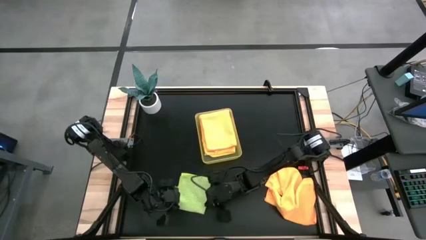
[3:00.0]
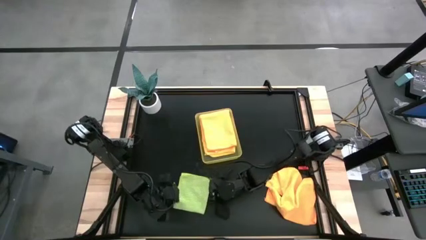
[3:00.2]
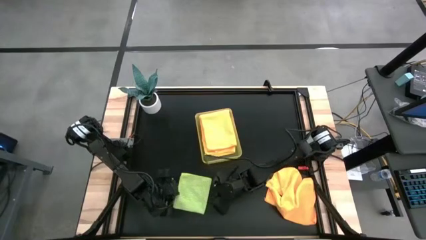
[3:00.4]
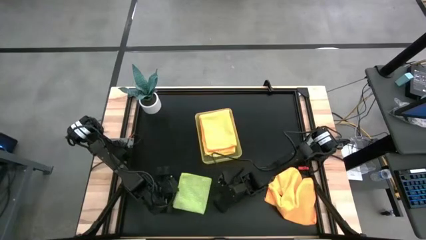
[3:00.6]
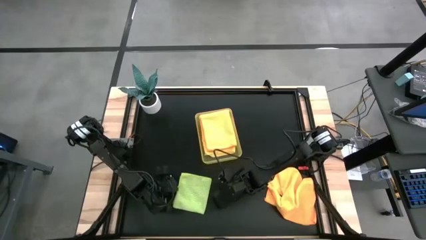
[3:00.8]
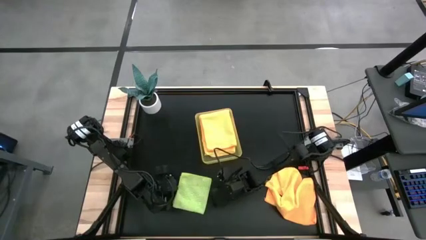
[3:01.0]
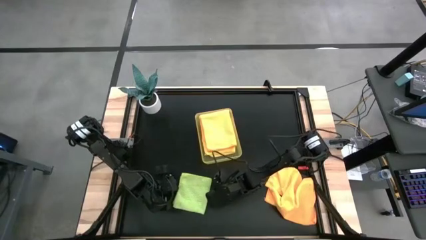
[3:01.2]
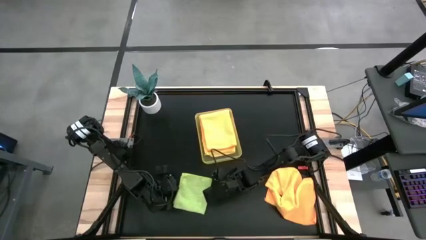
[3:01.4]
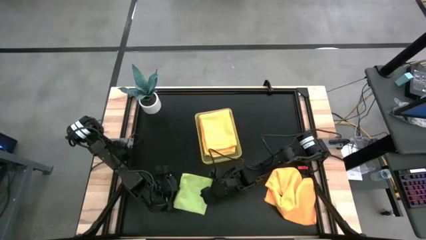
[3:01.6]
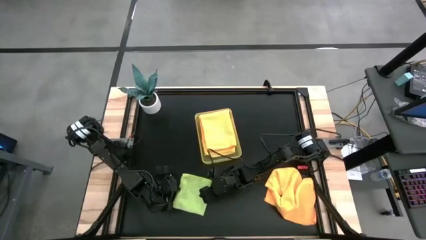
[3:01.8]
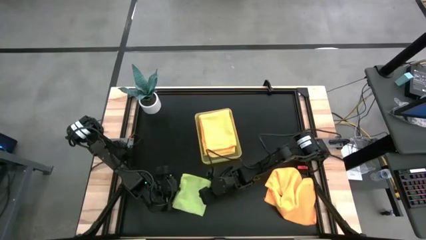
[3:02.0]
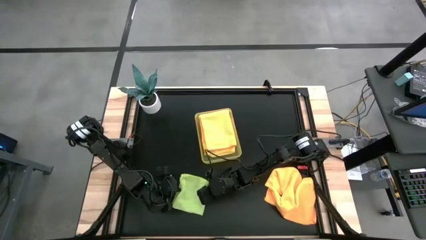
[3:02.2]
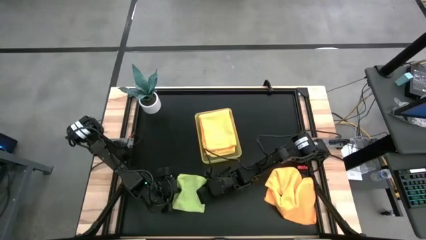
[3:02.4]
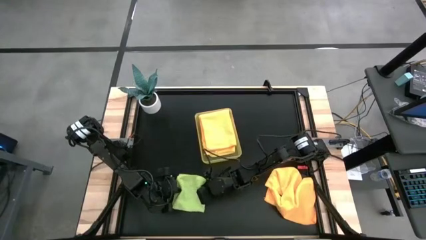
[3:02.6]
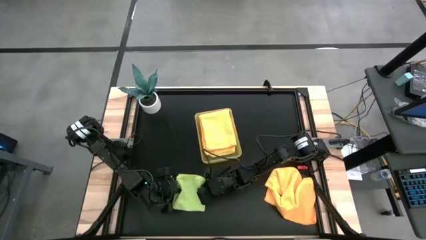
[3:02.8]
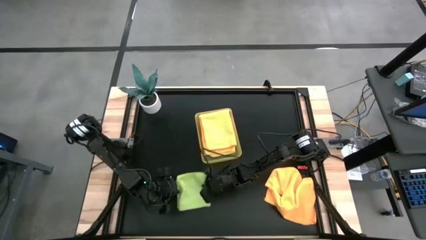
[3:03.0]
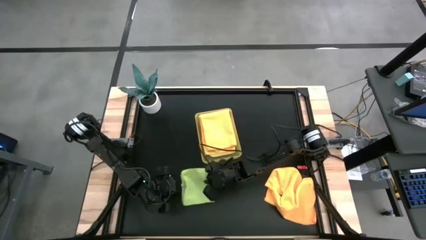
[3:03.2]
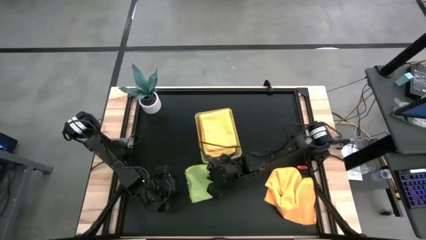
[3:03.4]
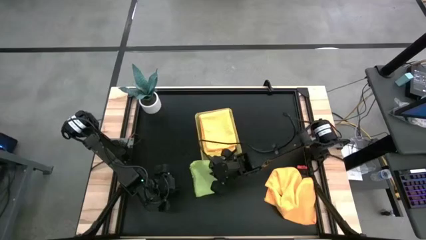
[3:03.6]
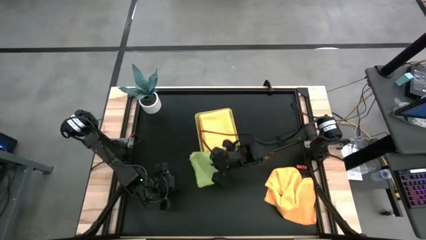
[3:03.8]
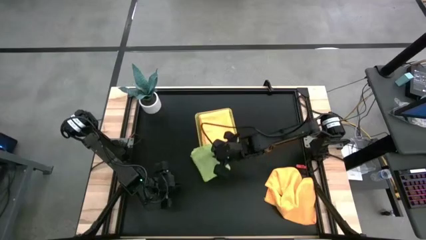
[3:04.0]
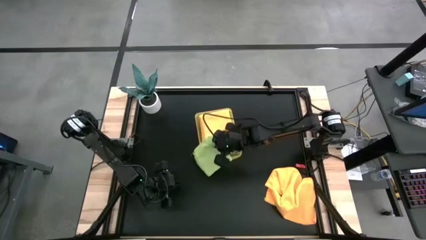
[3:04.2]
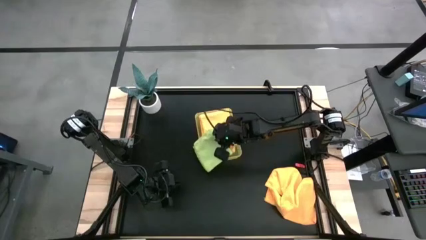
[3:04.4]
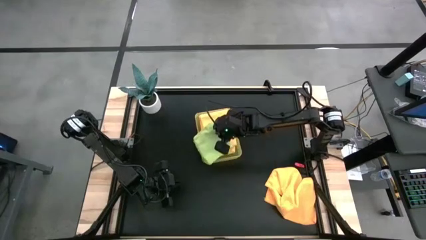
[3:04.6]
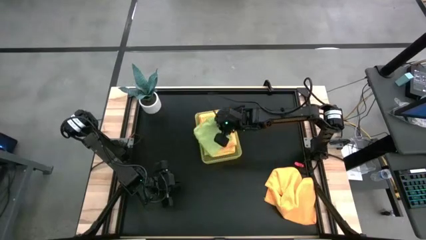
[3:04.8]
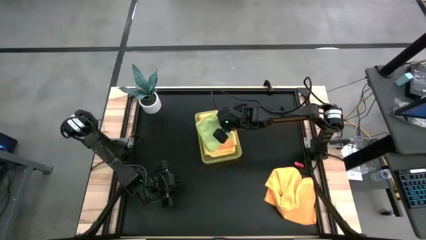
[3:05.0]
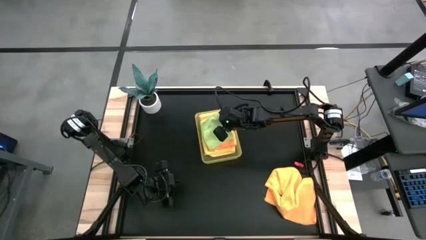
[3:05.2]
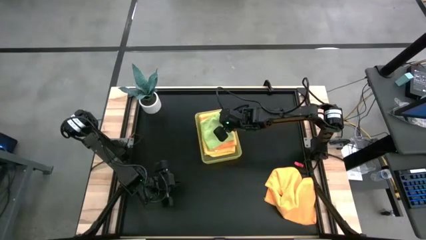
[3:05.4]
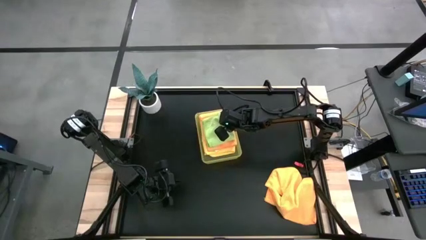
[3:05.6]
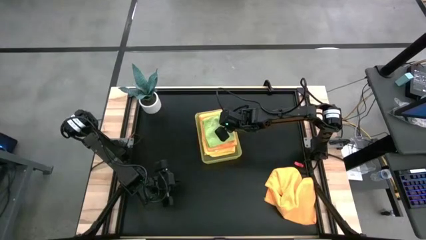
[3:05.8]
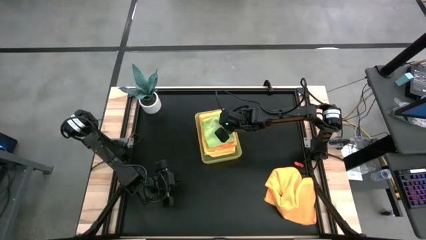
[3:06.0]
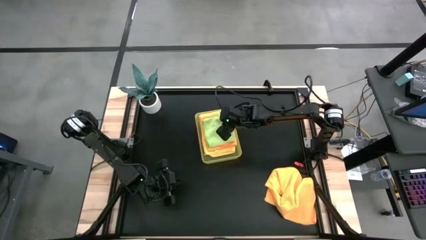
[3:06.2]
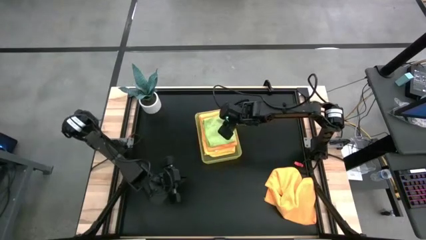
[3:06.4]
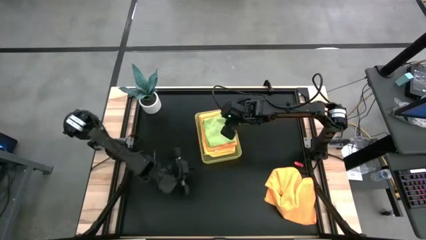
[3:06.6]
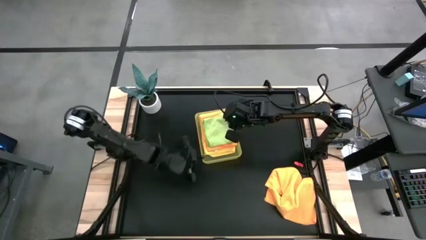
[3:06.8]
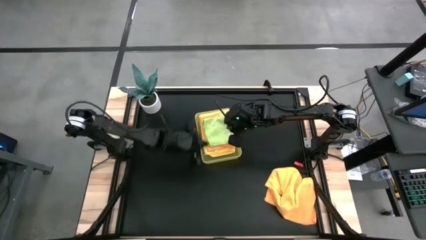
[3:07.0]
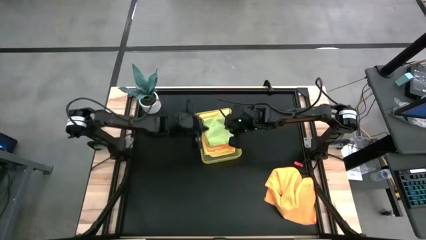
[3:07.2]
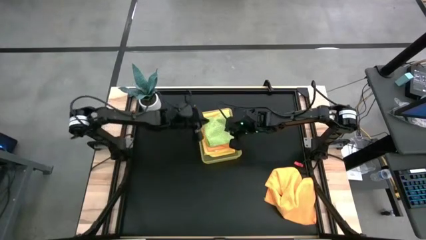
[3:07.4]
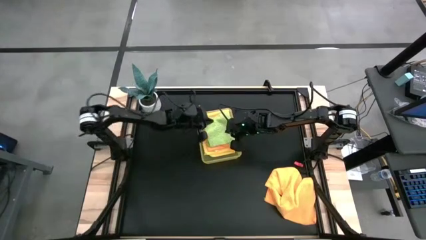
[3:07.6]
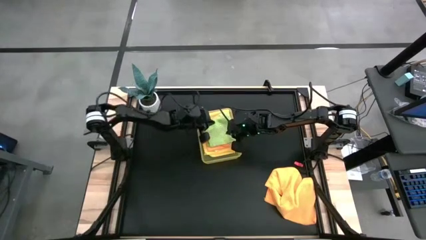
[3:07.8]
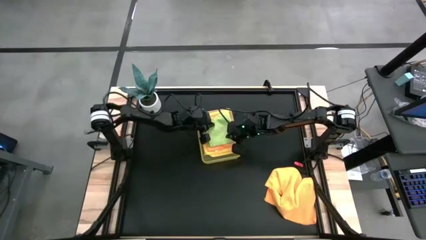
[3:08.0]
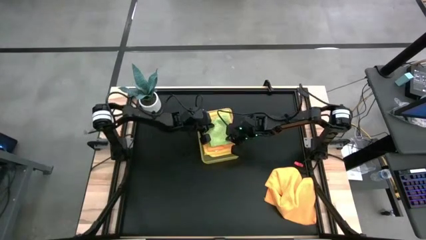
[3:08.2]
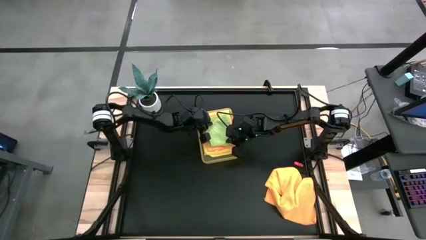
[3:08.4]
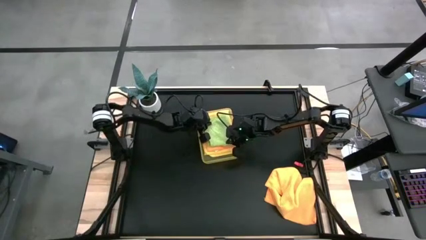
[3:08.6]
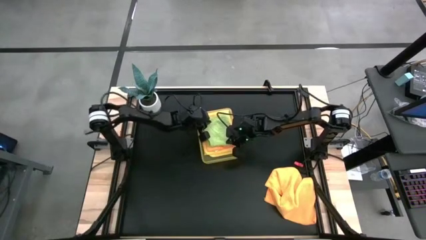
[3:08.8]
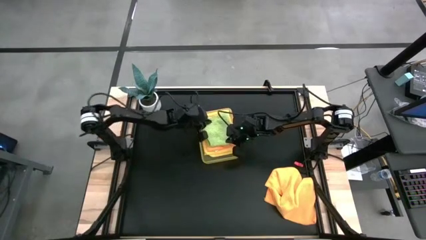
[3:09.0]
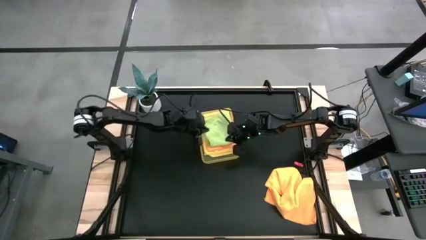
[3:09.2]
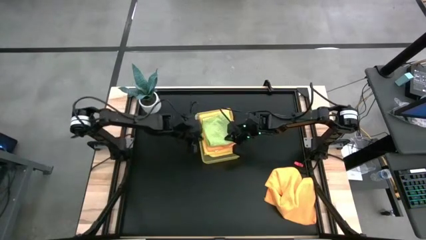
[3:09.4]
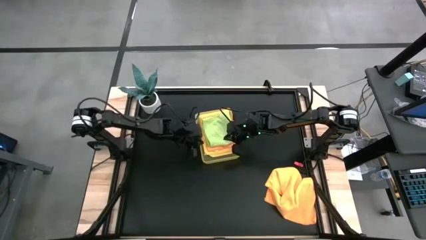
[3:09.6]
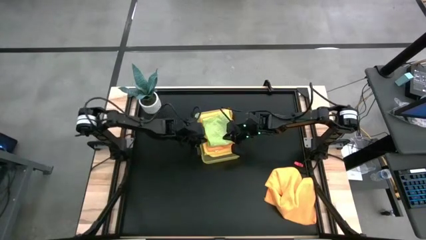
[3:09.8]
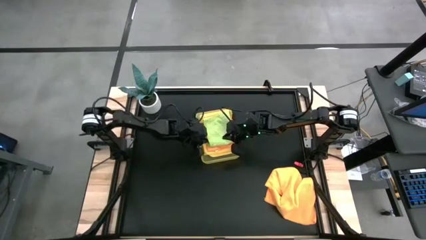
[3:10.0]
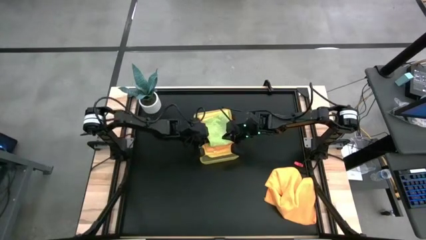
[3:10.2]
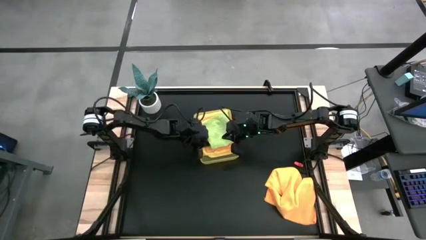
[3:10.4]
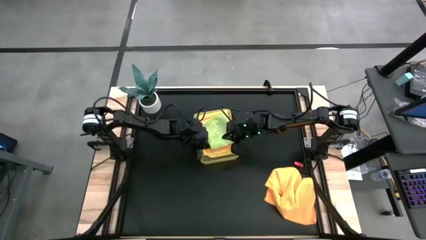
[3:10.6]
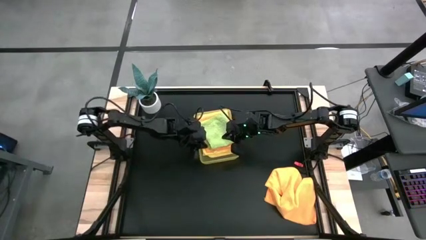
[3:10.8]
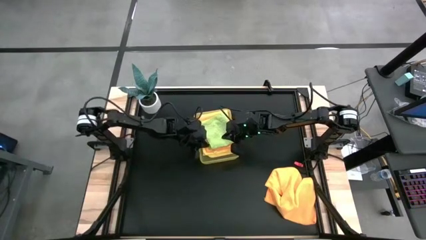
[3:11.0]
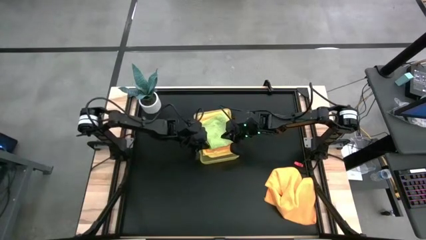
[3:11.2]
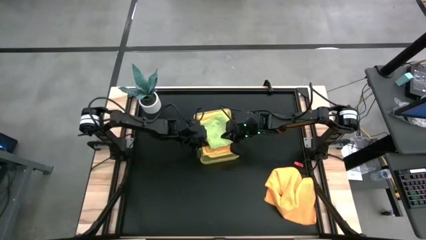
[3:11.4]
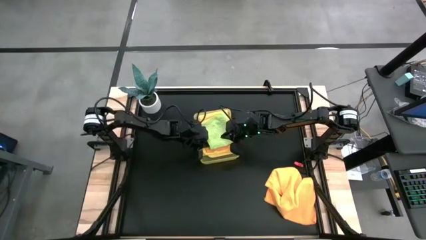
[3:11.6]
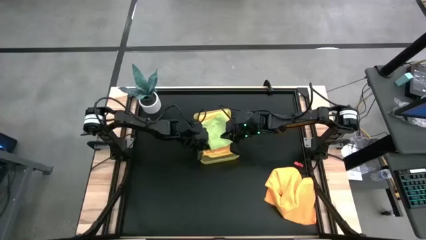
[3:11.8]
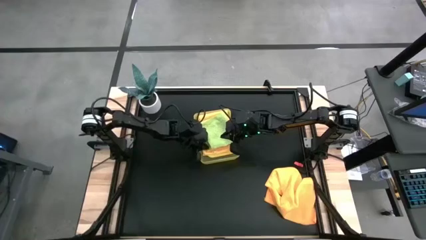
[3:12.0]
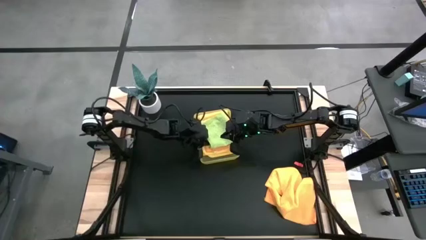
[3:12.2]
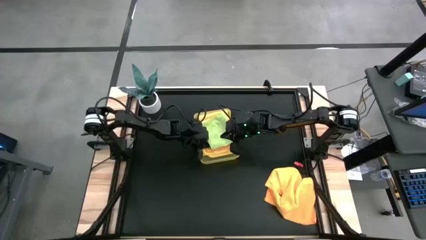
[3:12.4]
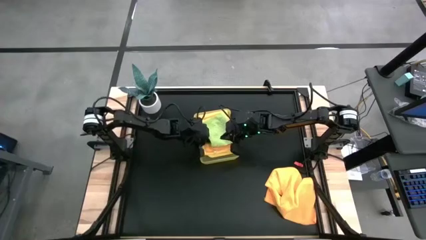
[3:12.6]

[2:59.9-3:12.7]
Task: Fold microfiber towels
Put the folded green microfiber fiber cloth yellow microfiber cloth into the bin

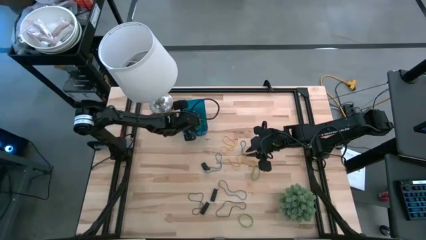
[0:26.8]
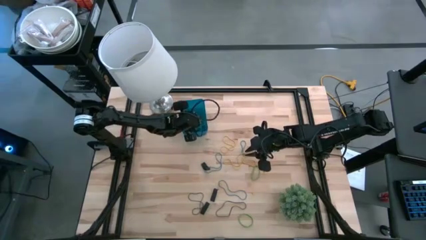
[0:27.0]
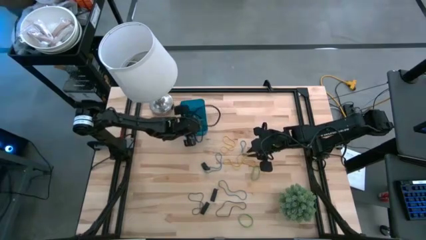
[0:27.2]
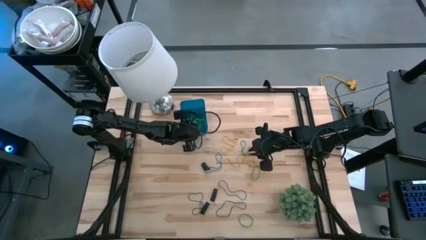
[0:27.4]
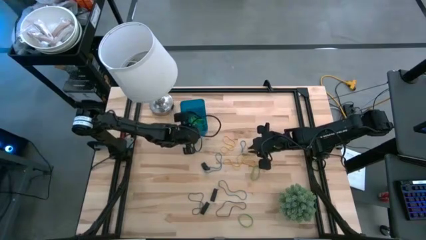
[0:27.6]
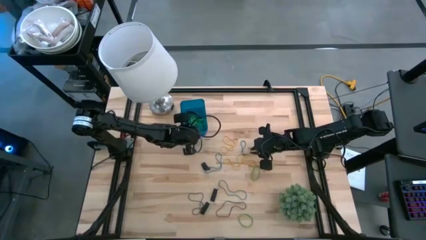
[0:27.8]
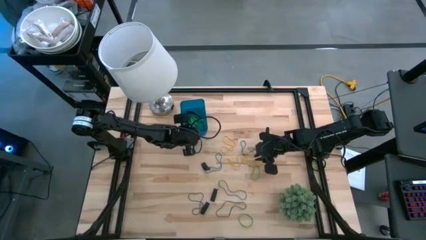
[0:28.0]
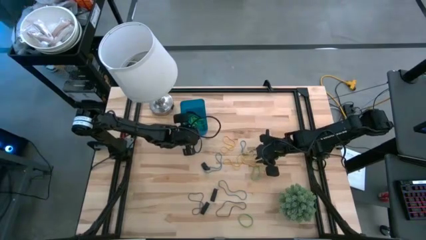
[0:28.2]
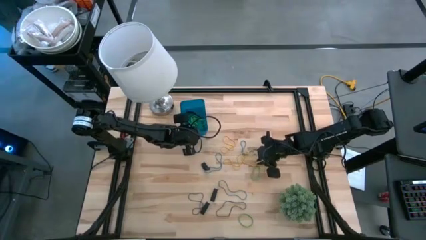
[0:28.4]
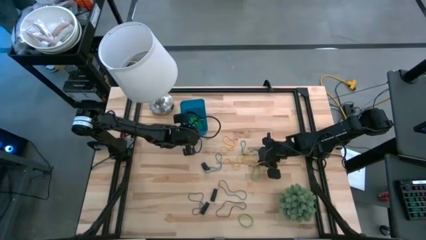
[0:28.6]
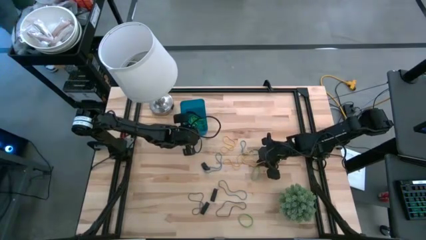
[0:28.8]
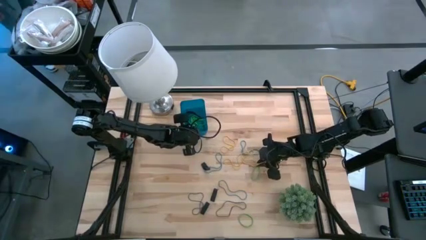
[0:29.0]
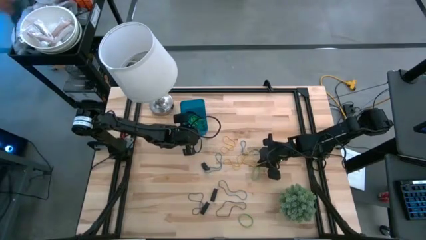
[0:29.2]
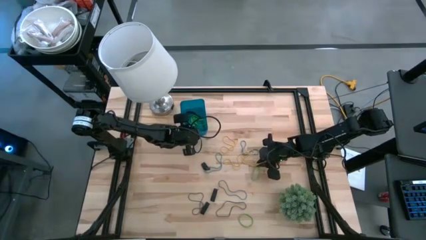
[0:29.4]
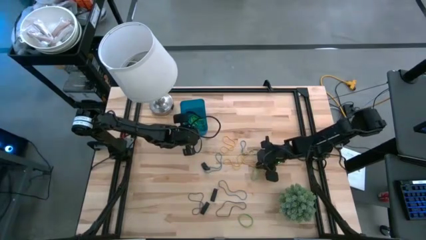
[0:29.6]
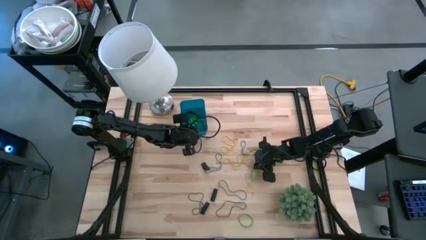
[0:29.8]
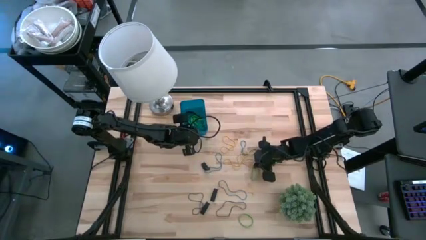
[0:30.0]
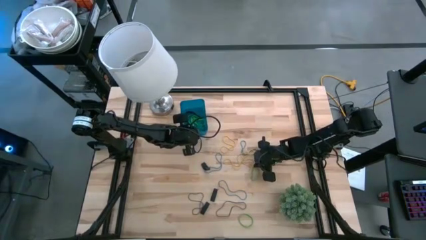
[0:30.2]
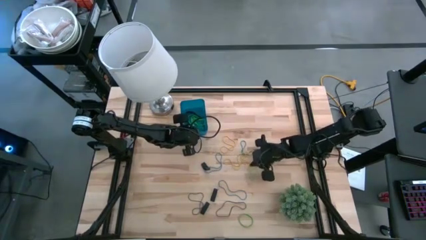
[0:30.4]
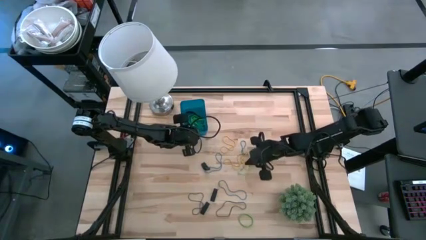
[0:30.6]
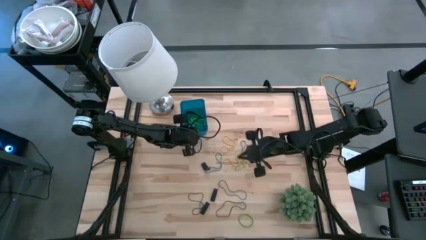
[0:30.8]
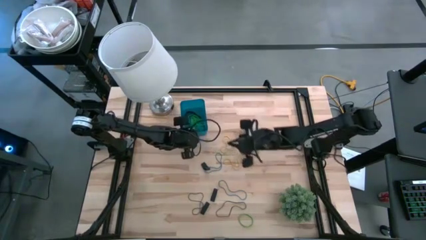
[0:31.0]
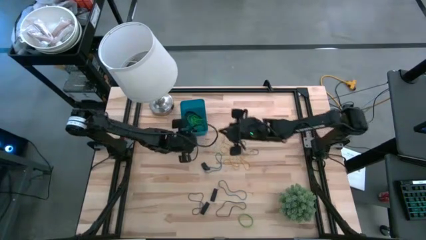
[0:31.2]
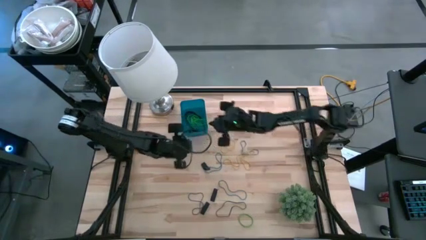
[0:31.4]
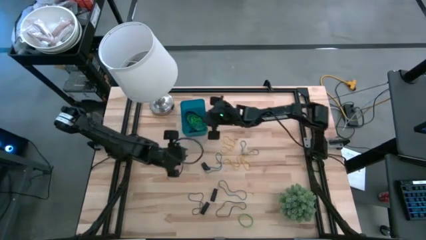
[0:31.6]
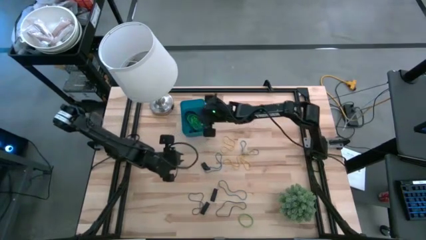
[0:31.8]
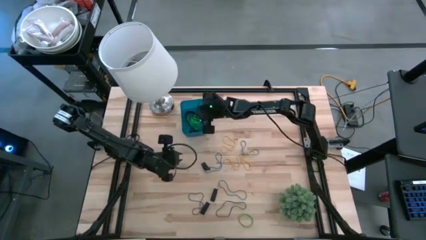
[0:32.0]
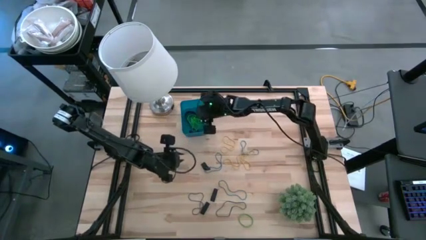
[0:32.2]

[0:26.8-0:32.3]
Task: Pick and place rubber bands into bin
Put the top green rubber band into the blue bin
